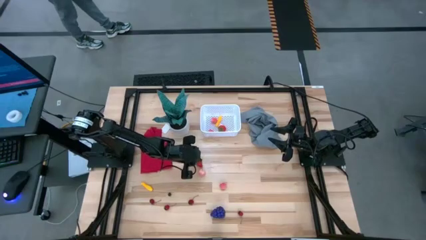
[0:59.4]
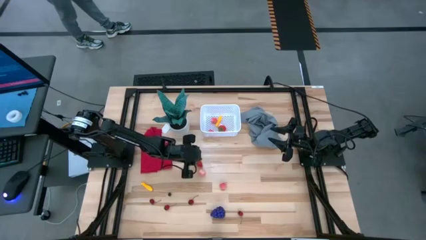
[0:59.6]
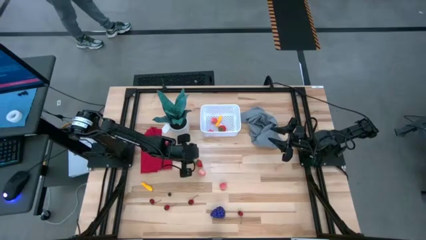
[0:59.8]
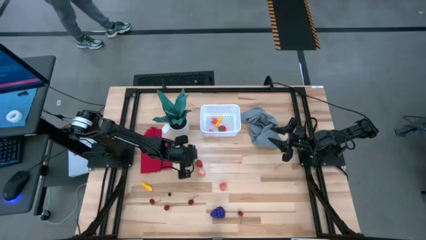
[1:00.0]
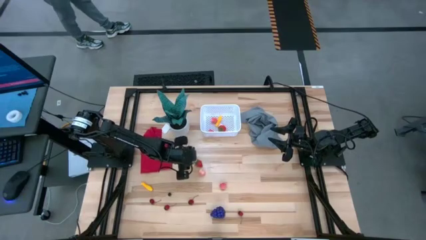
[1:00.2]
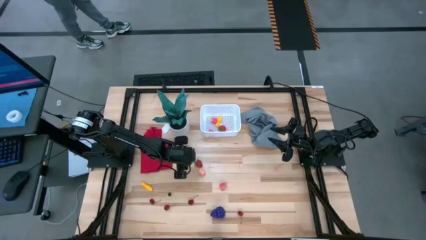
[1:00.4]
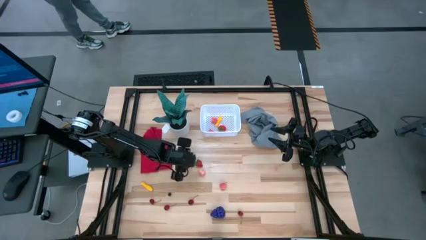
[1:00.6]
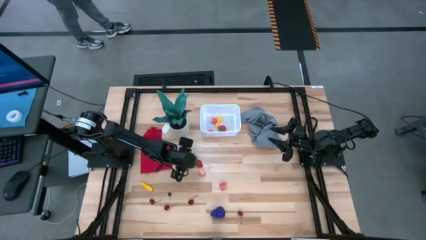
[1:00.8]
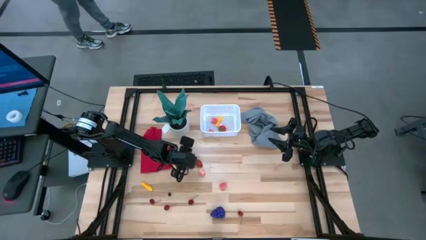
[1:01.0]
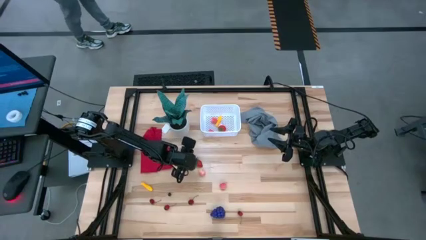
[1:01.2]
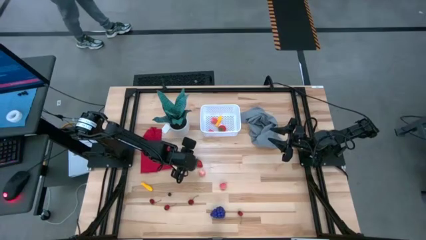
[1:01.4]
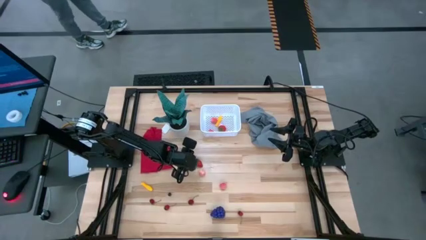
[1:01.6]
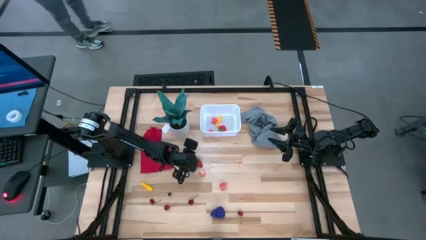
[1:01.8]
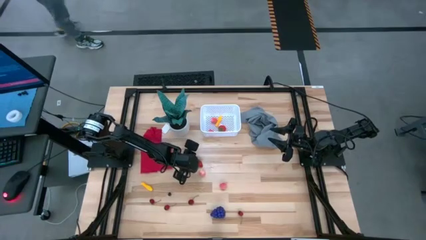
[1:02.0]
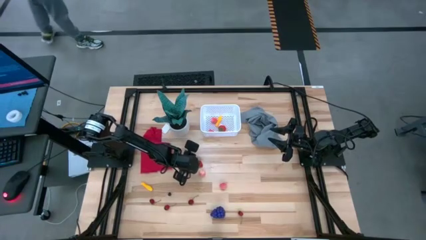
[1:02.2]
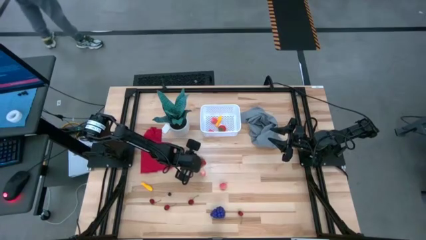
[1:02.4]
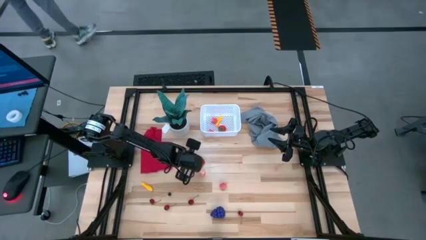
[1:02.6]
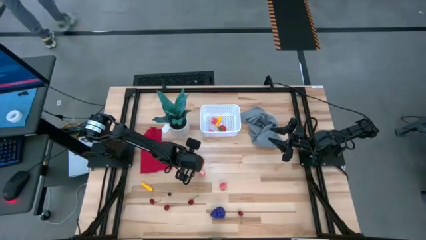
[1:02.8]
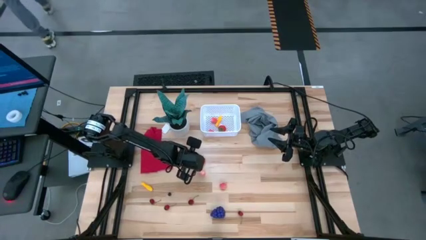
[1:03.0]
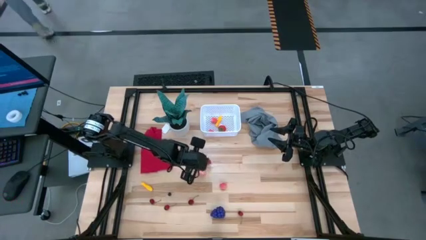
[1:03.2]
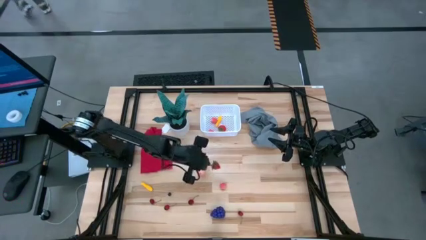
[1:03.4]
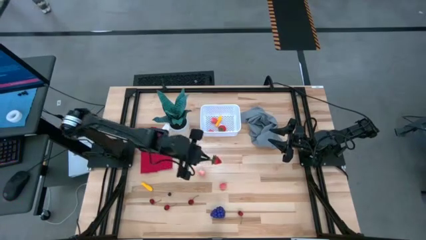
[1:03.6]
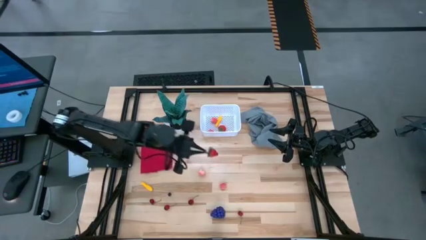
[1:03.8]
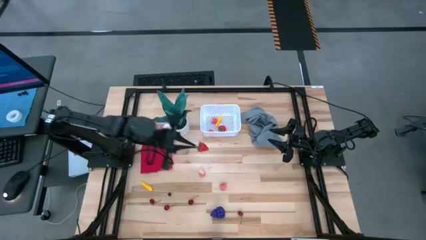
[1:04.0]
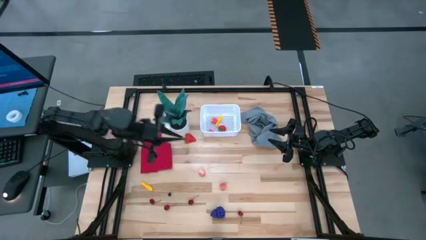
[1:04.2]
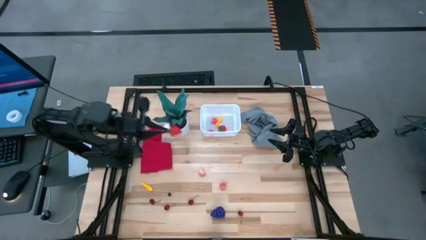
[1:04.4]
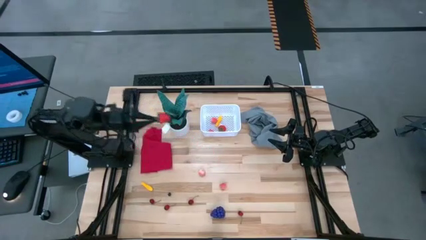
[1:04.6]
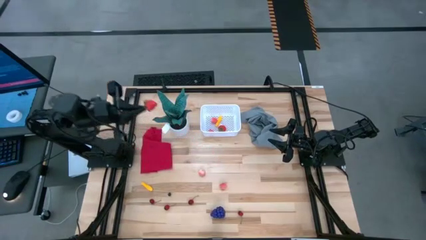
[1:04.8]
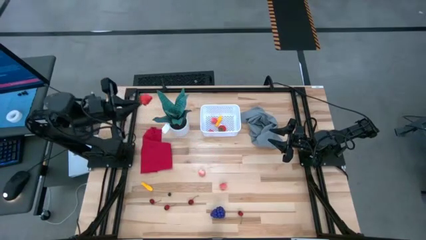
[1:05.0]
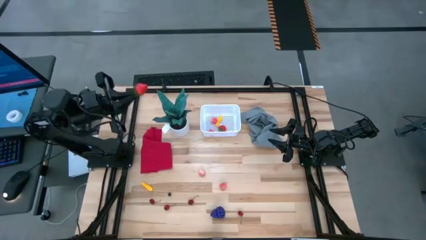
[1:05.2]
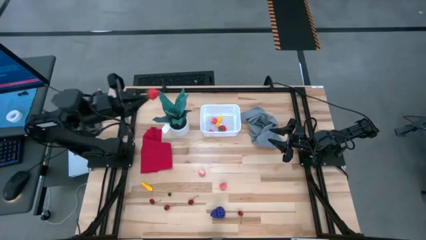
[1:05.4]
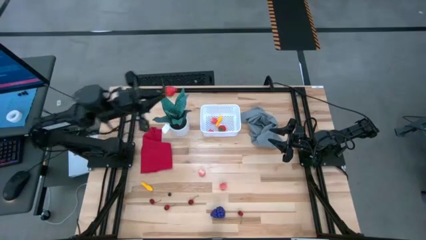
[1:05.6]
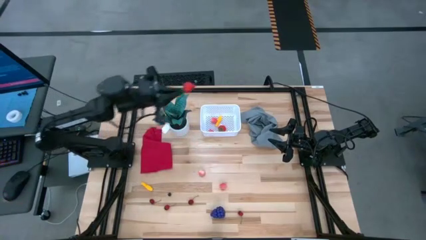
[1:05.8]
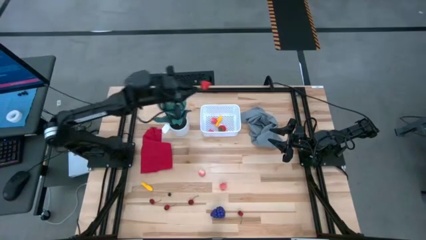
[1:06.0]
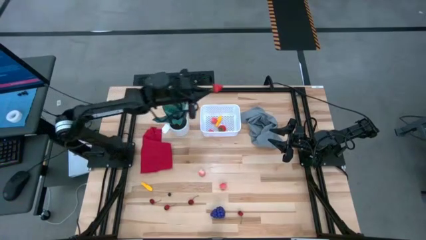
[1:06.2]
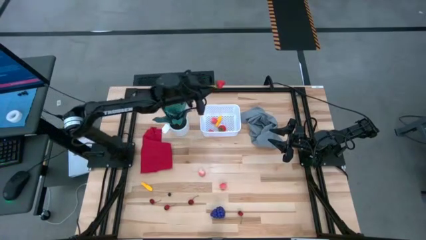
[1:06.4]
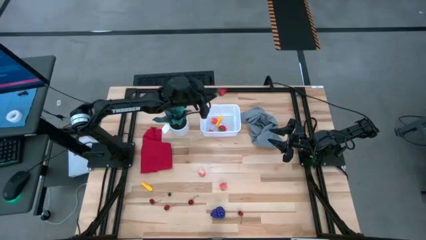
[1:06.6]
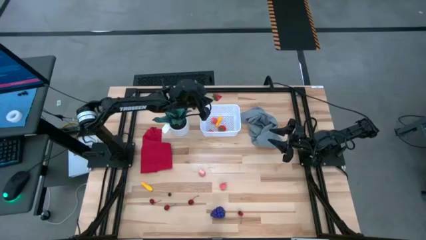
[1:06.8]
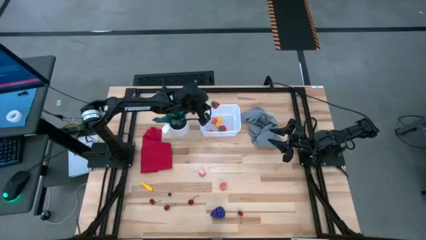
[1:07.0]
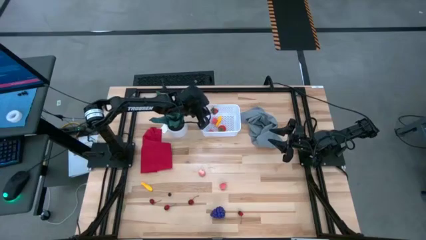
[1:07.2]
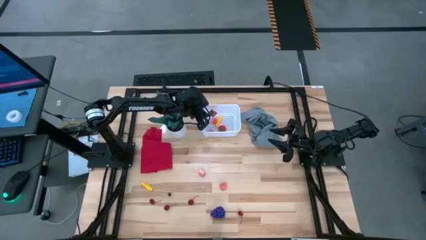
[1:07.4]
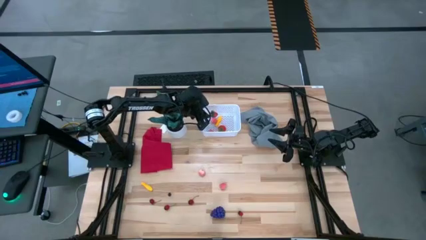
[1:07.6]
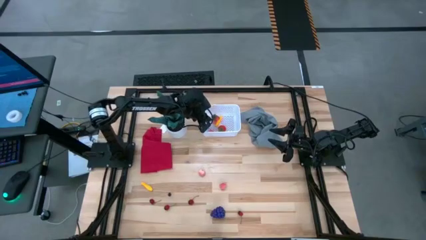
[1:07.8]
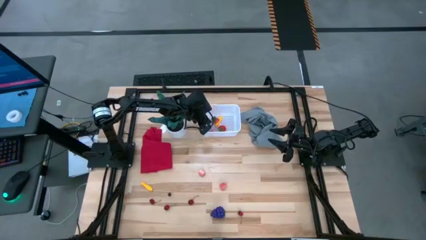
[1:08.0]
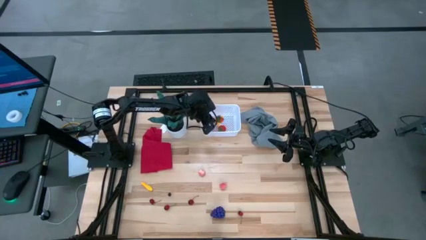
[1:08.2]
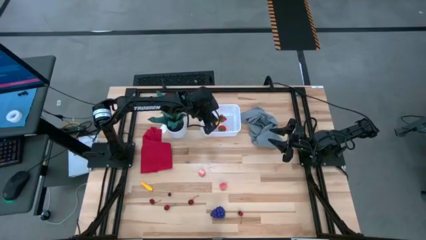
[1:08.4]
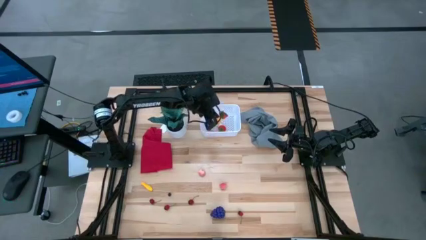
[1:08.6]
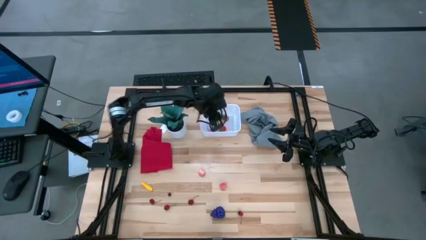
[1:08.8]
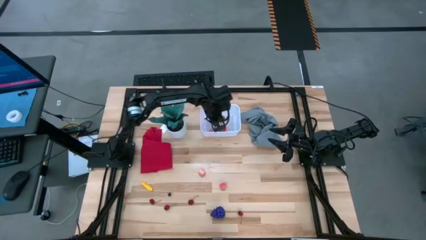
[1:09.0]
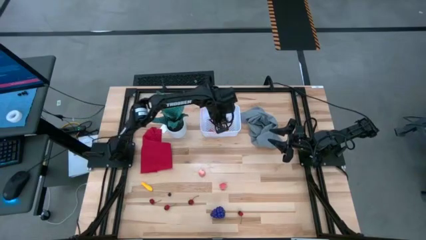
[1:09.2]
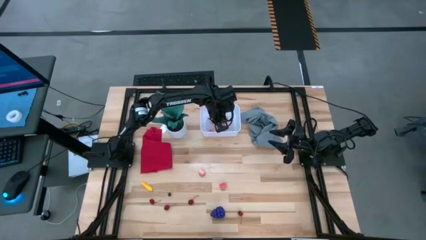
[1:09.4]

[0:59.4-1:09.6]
Task: Pick and placing Produce into tupperware
Put the red strawberry into the white bin

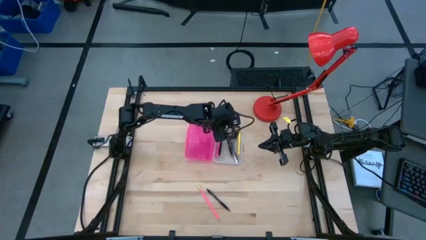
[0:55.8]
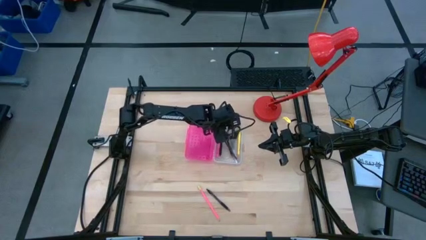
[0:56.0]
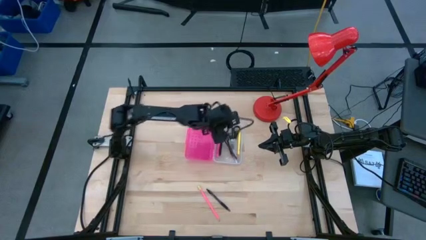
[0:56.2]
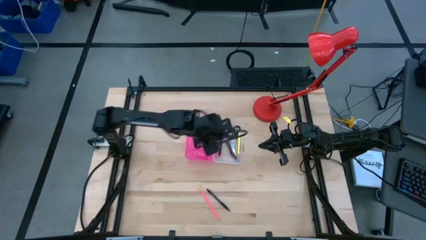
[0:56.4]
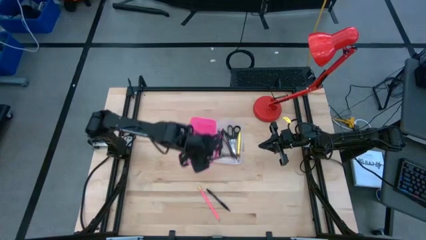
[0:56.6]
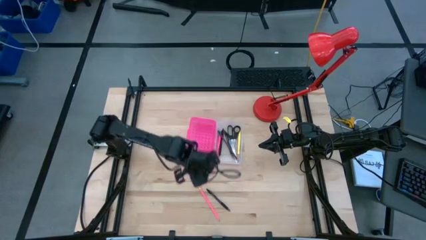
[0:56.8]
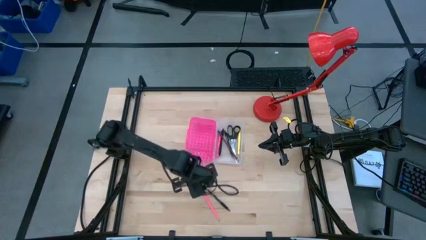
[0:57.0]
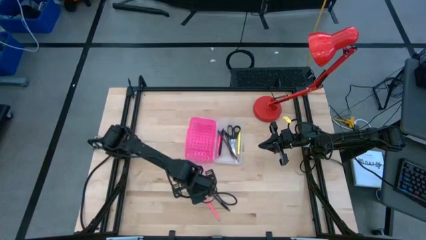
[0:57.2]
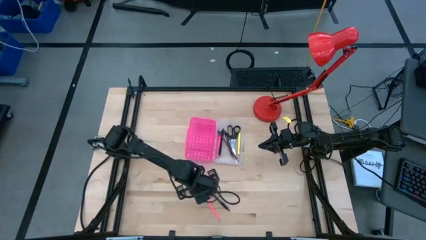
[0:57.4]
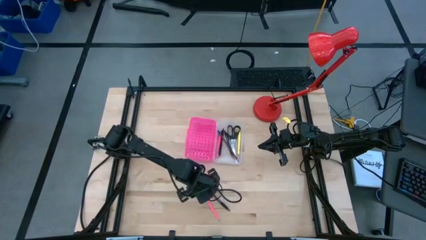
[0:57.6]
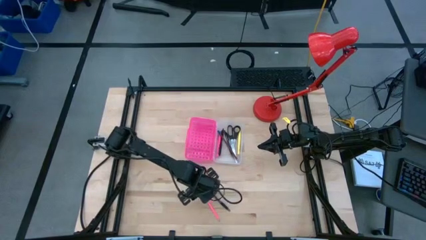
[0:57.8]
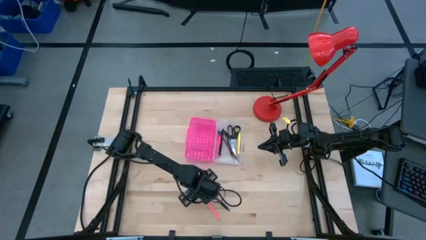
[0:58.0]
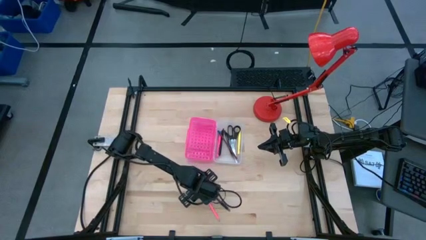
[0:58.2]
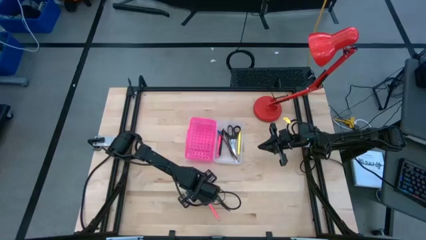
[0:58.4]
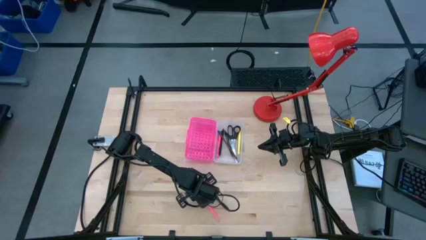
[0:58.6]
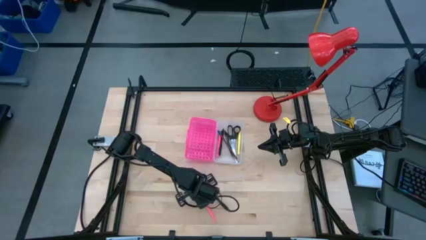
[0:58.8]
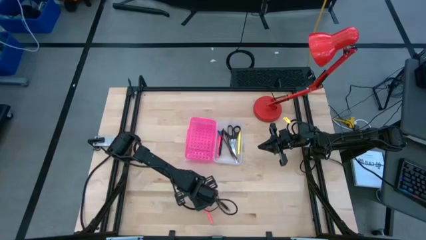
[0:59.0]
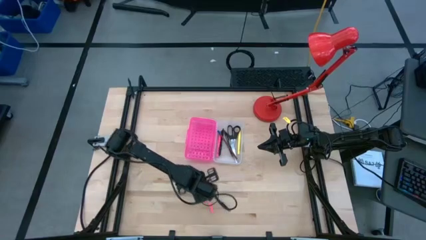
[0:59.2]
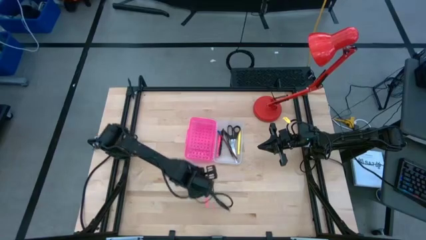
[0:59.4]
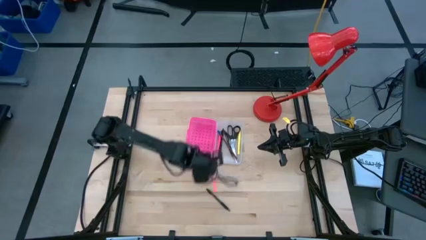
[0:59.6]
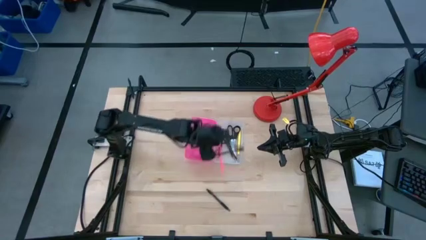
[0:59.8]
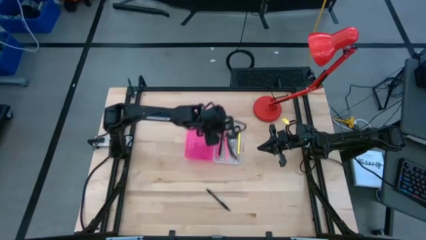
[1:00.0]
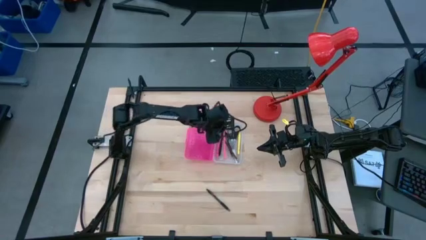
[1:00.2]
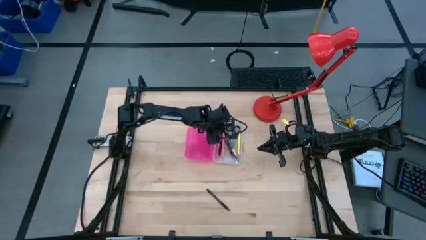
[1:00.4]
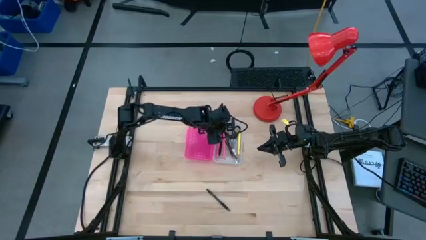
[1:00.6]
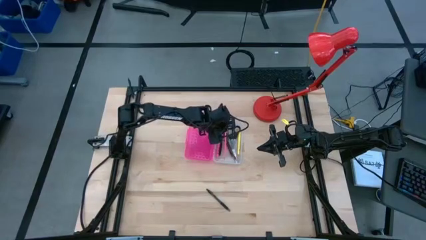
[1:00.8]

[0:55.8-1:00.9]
Task: Pick & place school supplies into a supply box
Put the pink pencil into the supply box

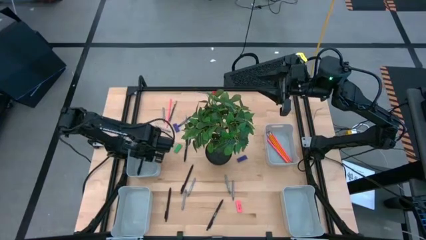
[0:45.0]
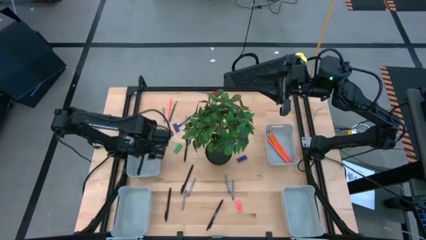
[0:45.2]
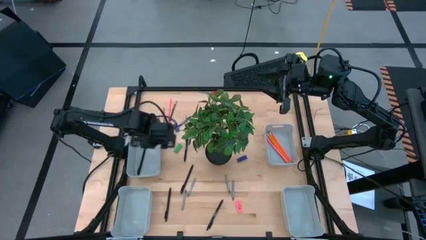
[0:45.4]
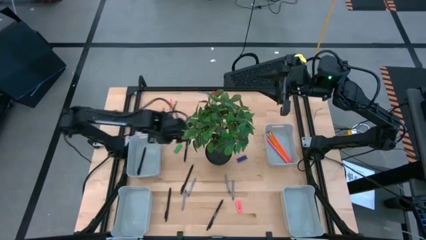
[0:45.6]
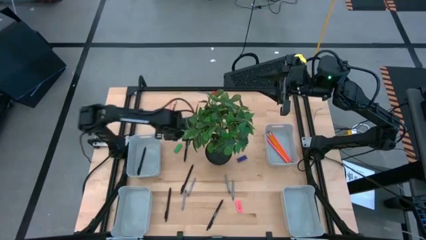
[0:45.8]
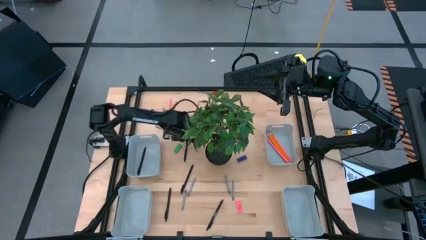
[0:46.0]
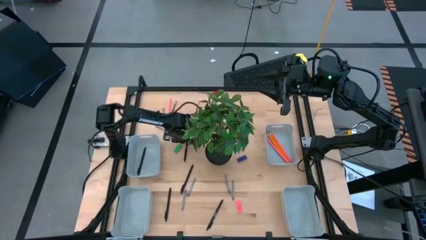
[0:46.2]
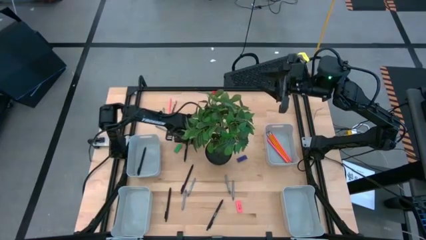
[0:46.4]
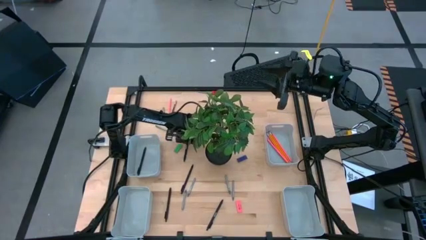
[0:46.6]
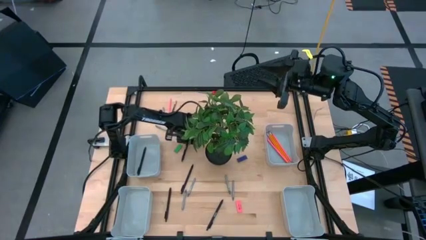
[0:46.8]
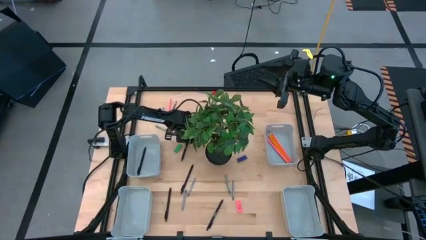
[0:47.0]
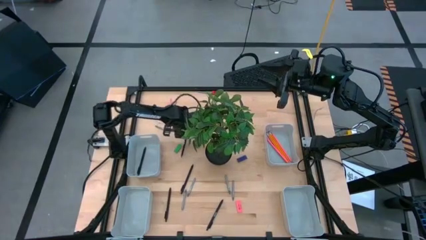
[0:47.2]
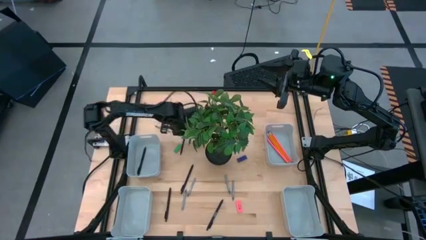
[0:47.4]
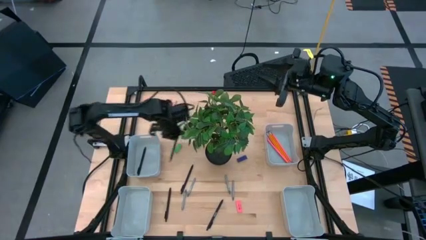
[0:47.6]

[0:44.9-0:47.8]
Task: Sort crayons/erasers/pens/pencils in bins
Put the black pen into the top left gray bin
